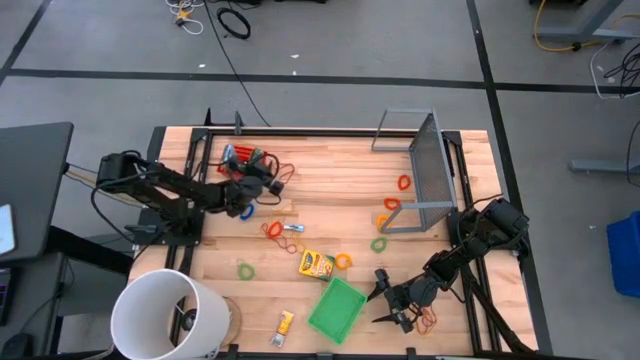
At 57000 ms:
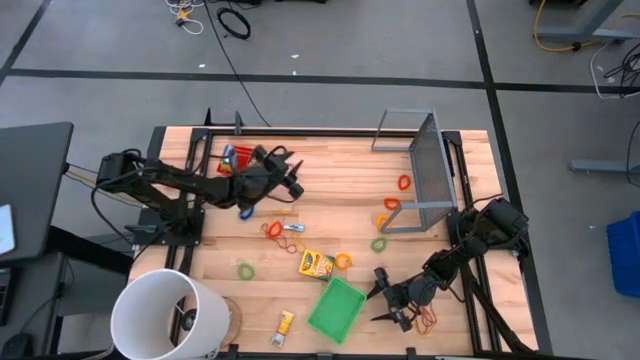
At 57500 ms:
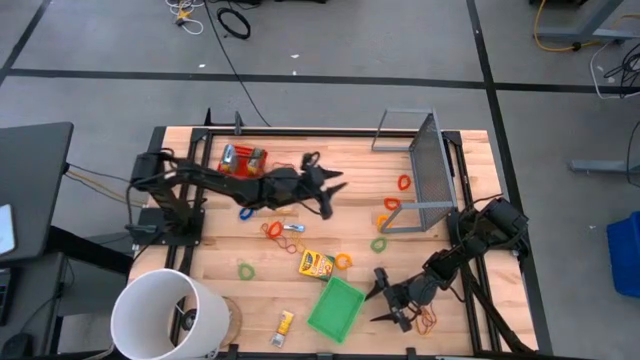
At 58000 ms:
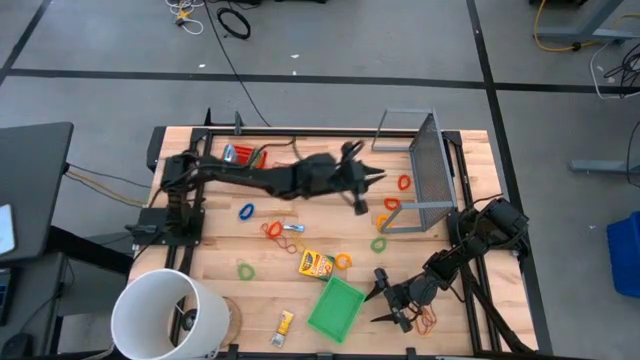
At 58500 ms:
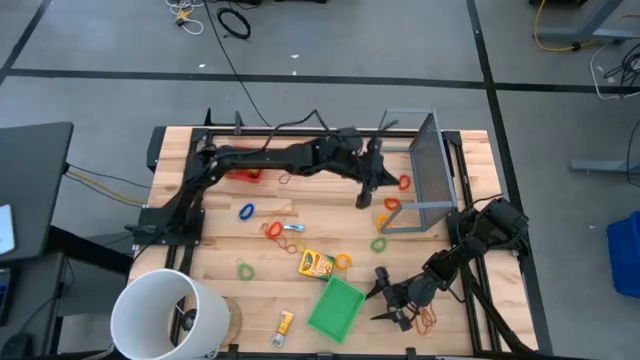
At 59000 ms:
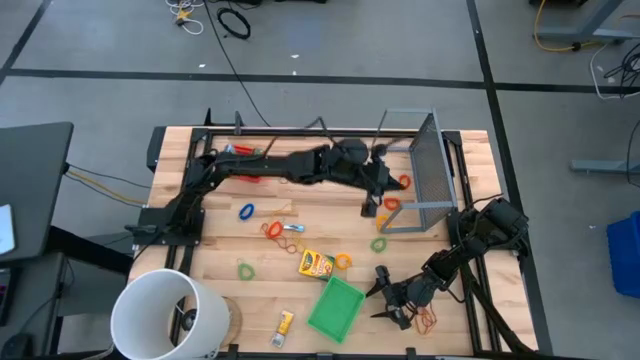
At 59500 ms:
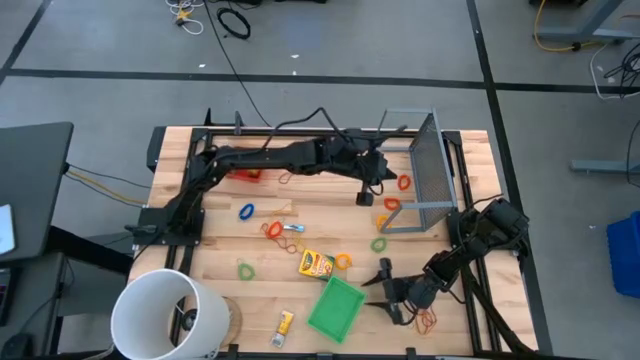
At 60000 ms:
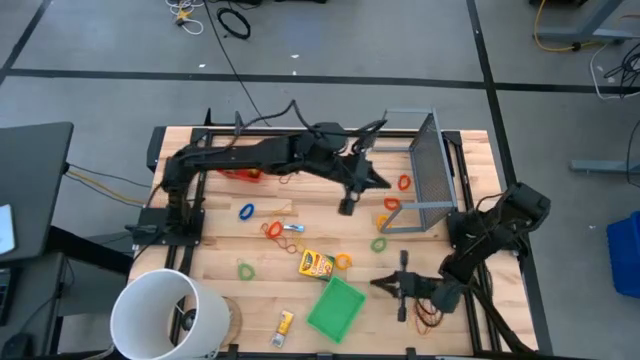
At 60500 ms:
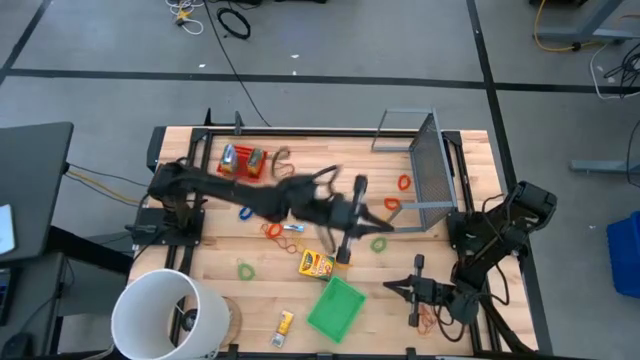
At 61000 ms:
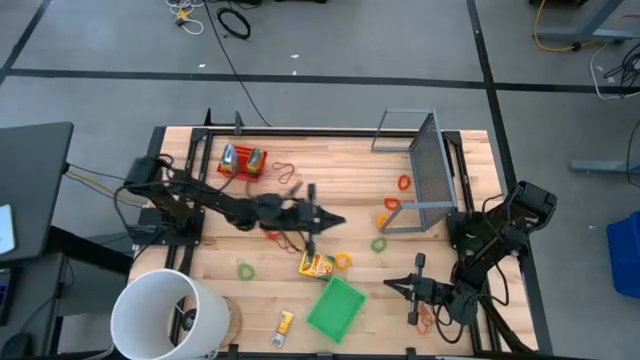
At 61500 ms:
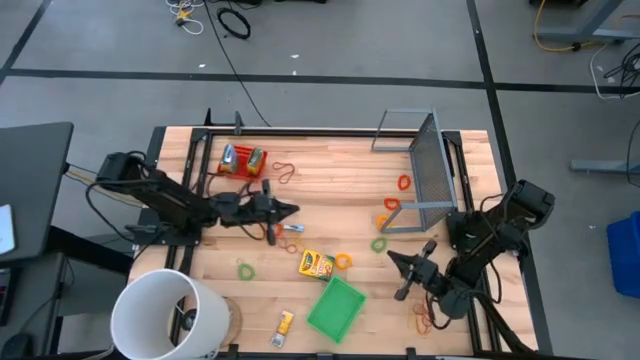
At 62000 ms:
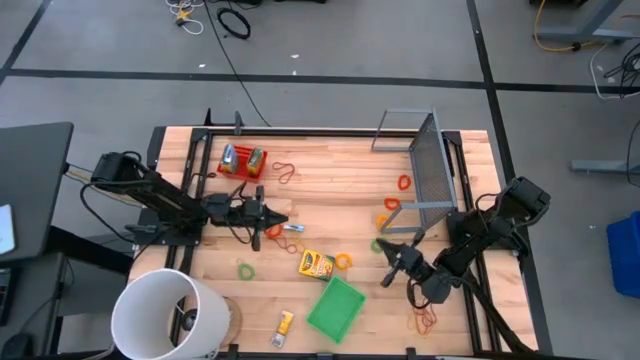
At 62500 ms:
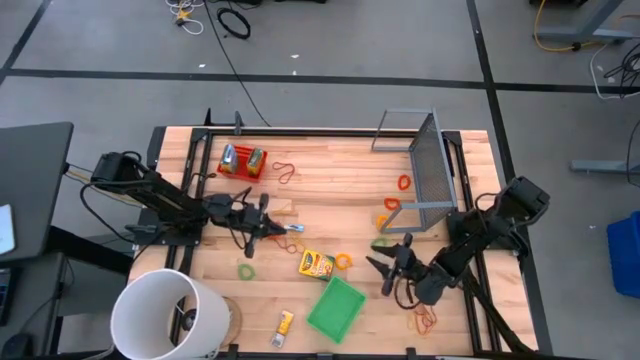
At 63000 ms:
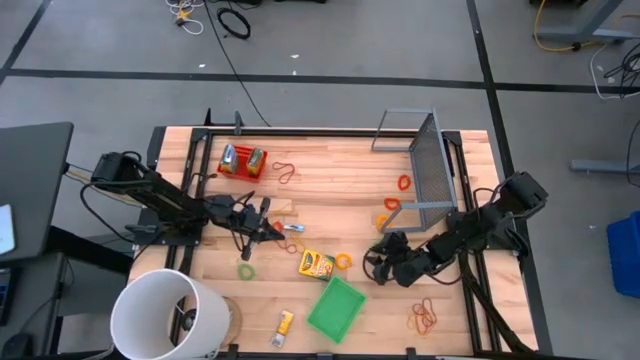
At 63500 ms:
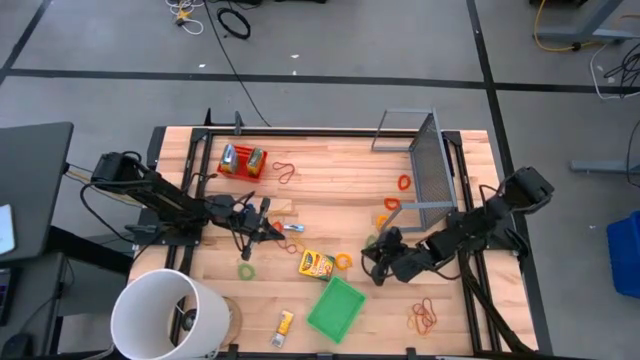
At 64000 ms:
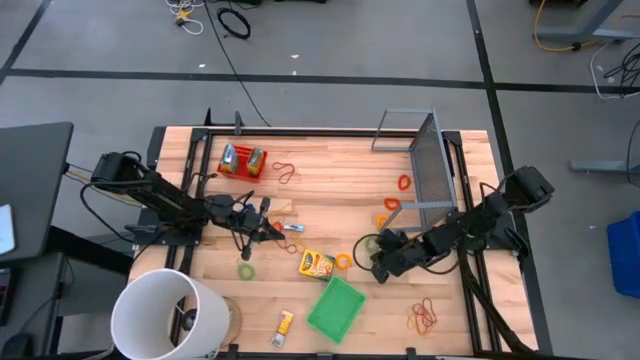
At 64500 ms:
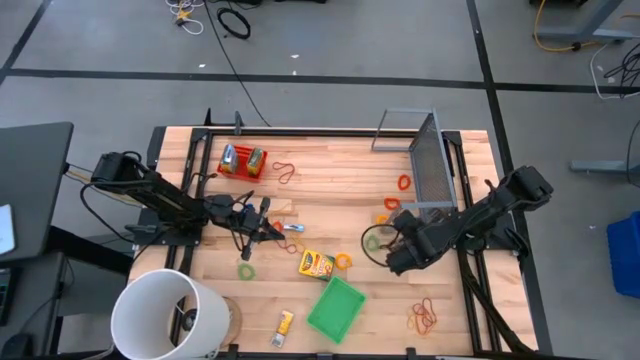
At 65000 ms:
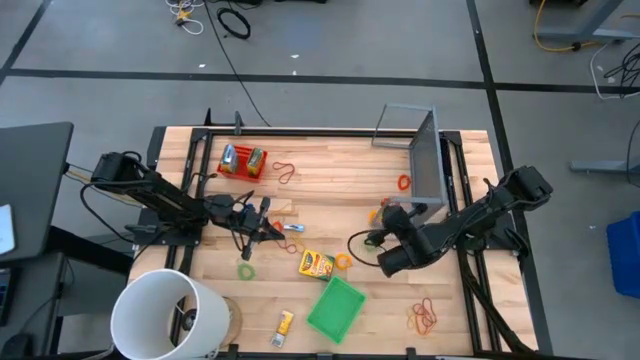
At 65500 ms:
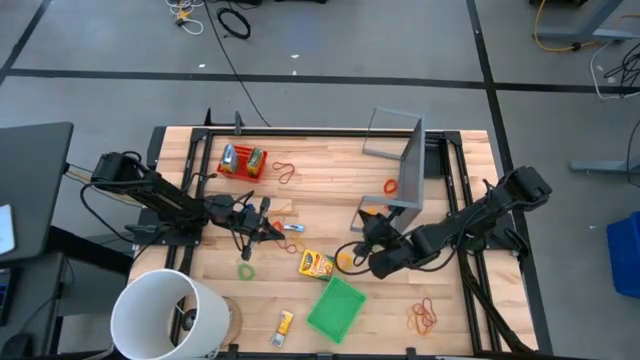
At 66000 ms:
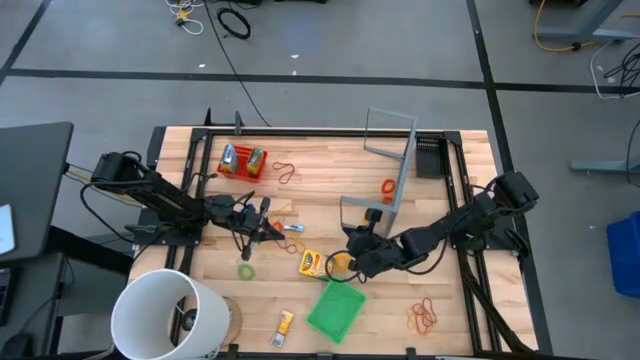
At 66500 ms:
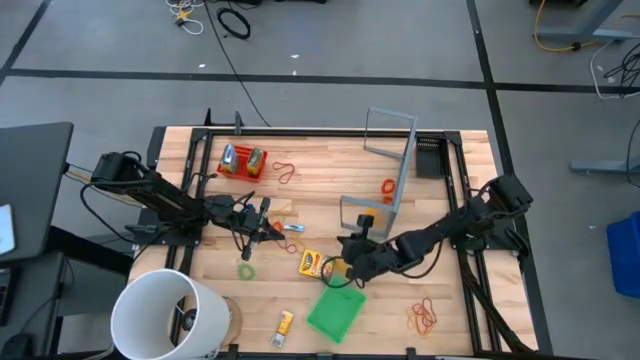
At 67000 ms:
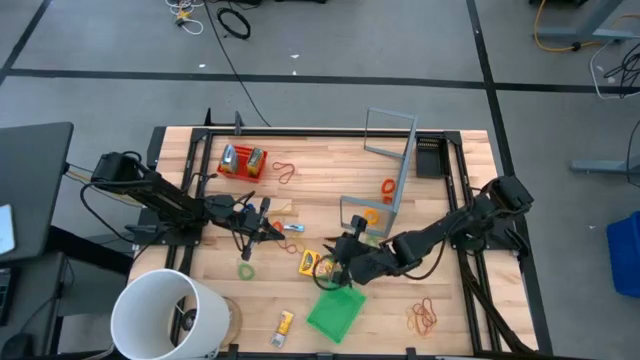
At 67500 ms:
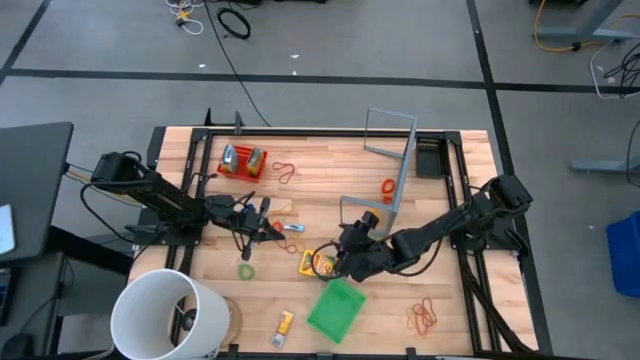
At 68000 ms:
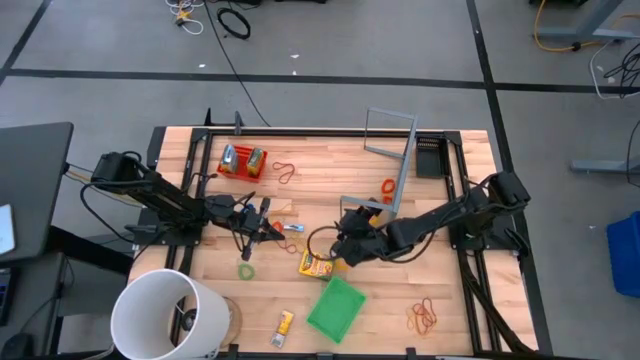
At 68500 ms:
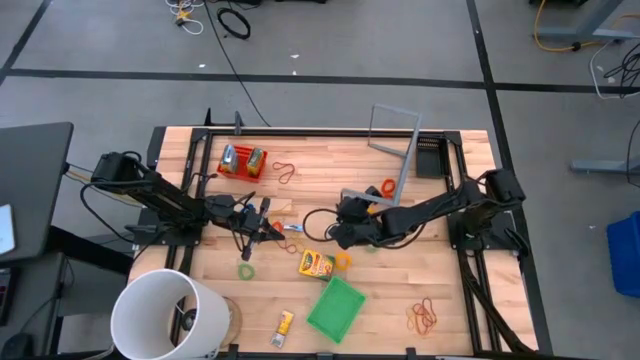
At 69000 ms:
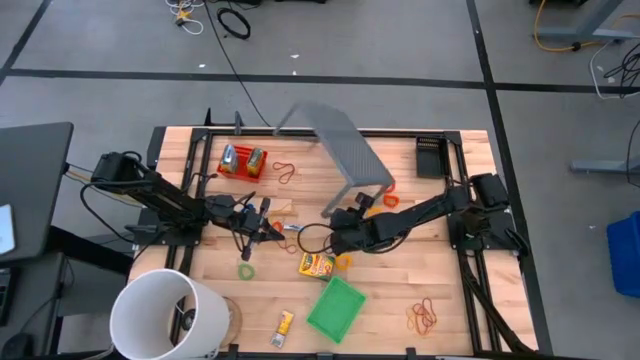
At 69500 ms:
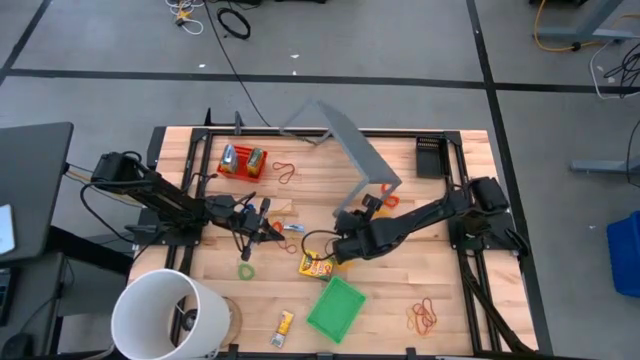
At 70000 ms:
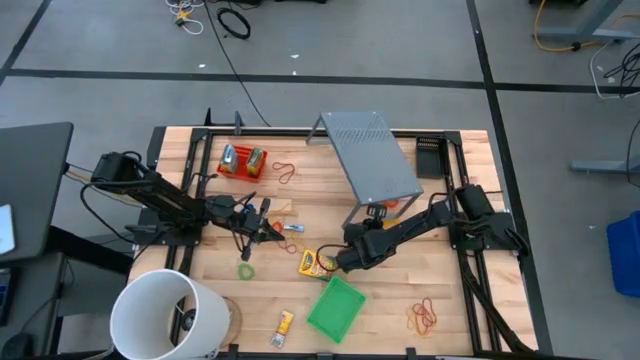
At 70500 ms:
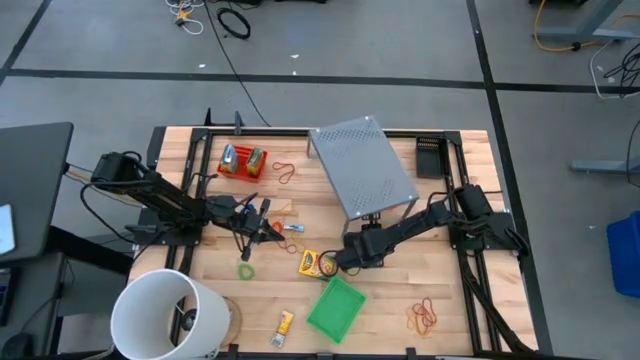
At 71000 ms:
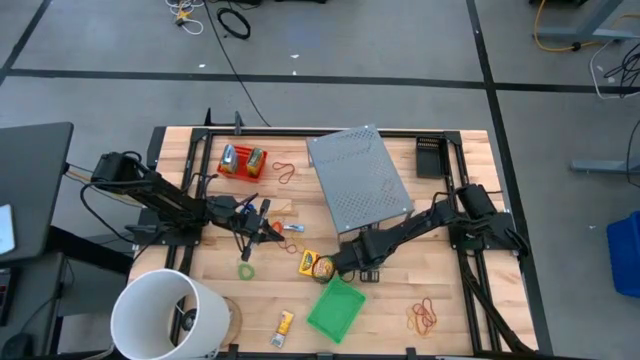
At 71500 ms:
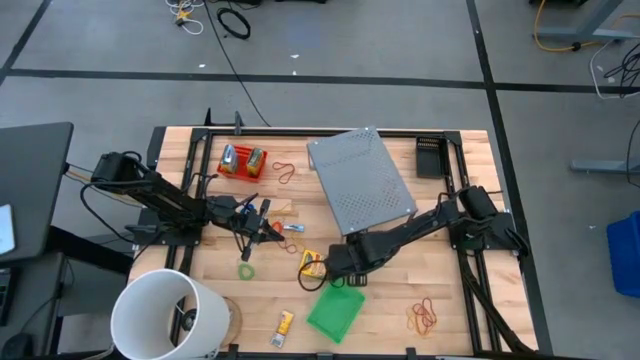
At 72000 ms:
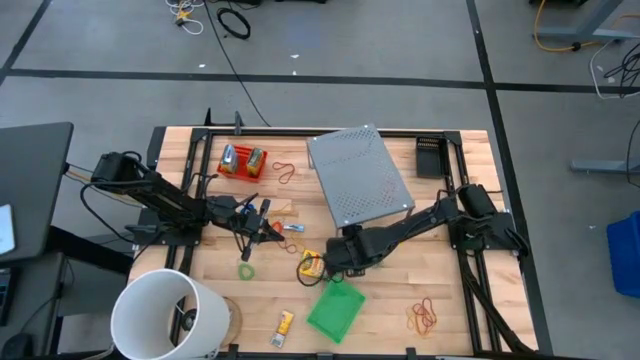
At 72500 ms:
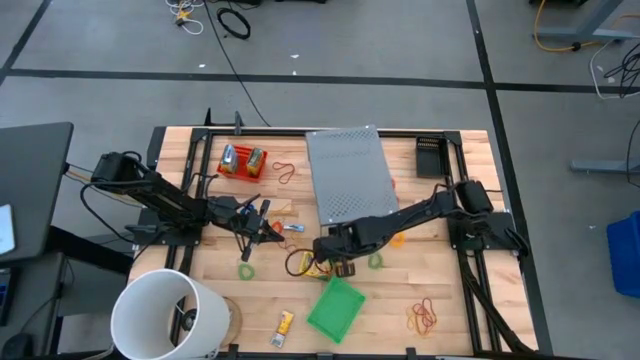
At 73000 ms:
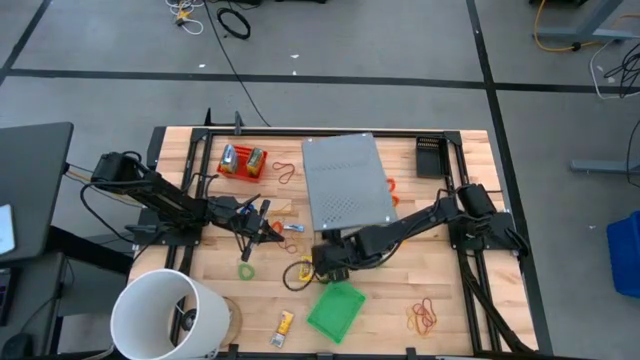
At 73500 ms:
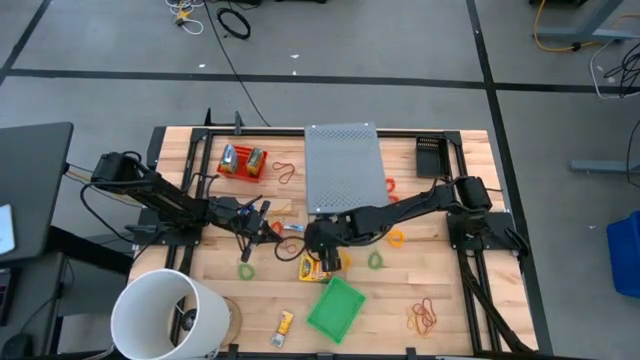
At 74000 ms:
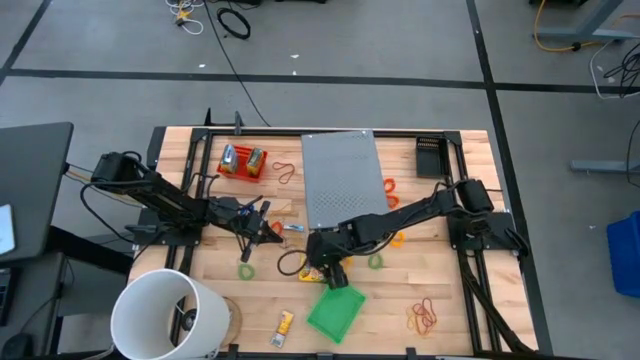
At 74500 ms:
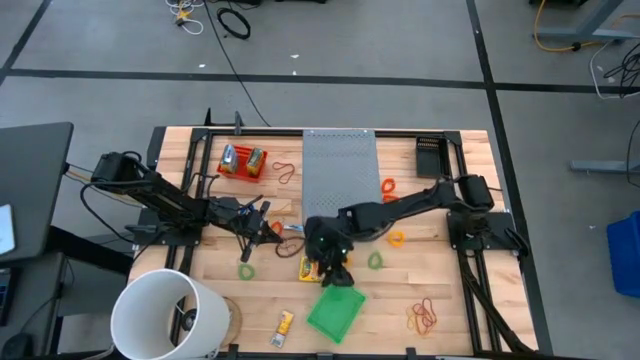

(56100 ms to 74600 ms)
Task: Pick & Place Office Desk Supplies
Adjust the shelf on the table

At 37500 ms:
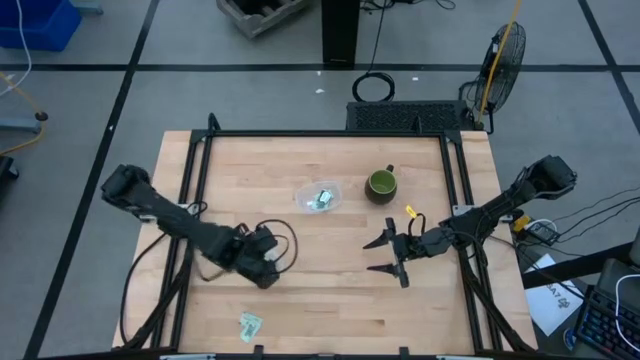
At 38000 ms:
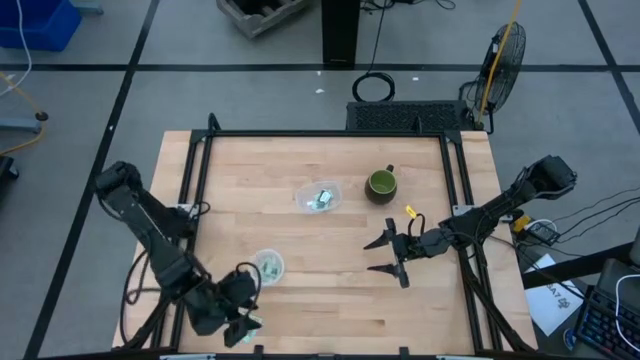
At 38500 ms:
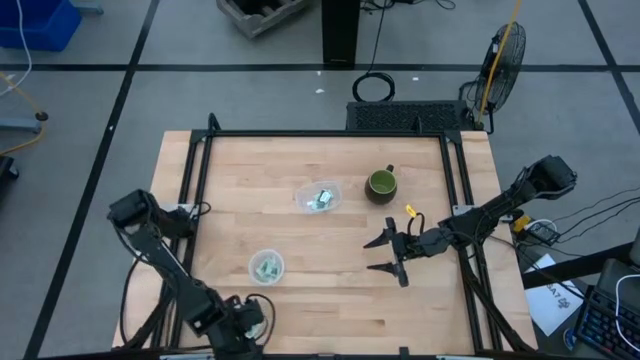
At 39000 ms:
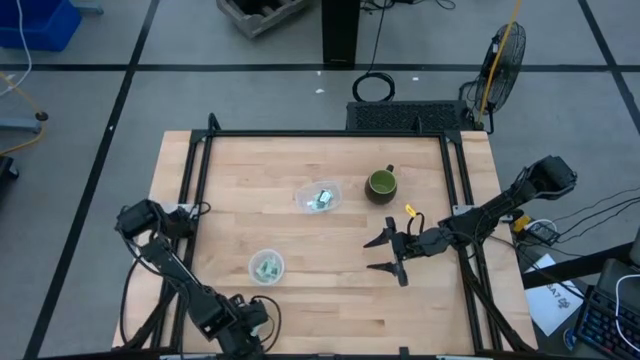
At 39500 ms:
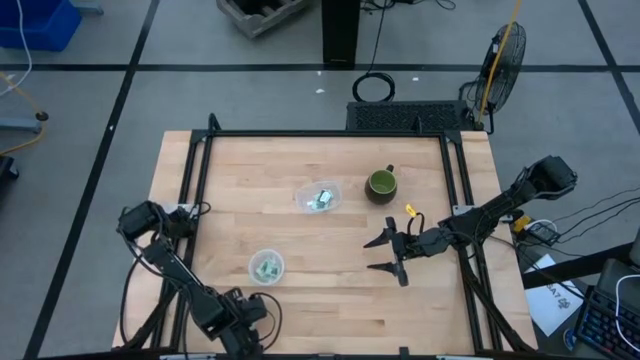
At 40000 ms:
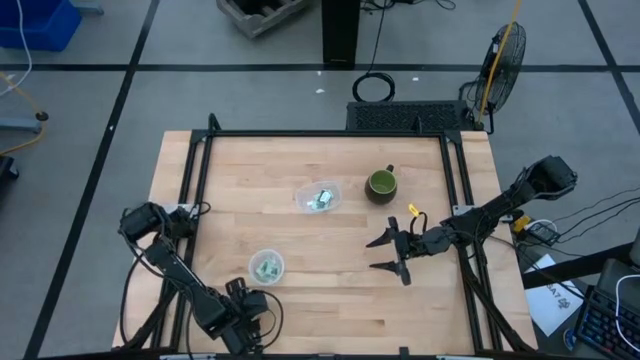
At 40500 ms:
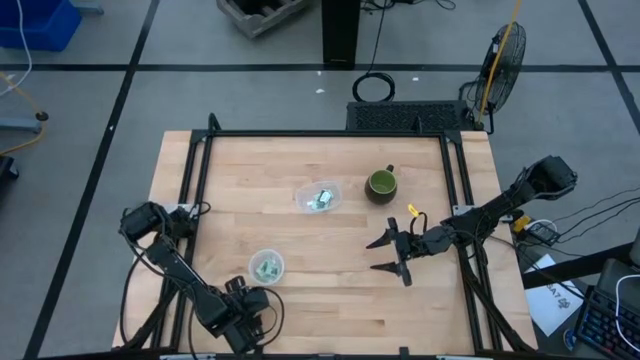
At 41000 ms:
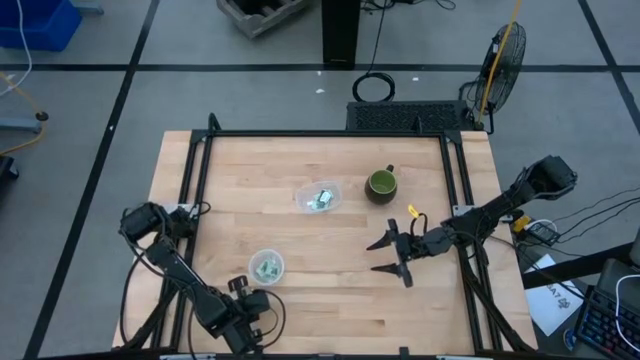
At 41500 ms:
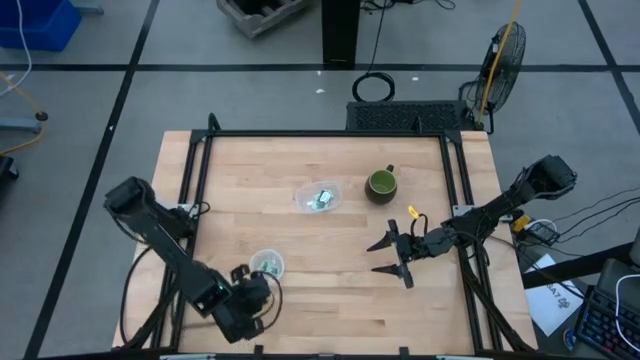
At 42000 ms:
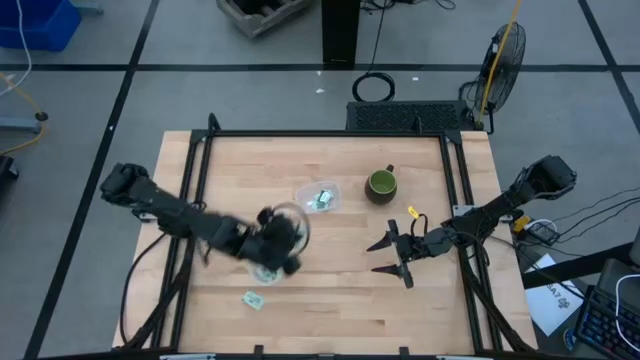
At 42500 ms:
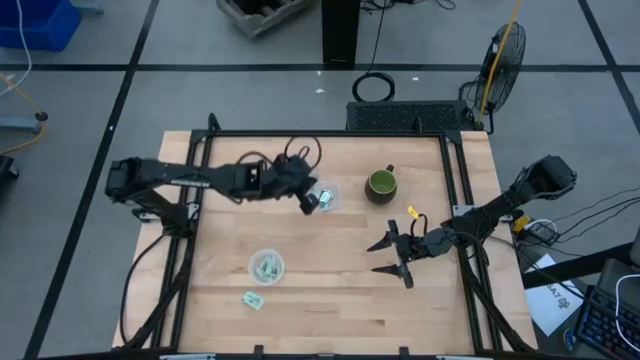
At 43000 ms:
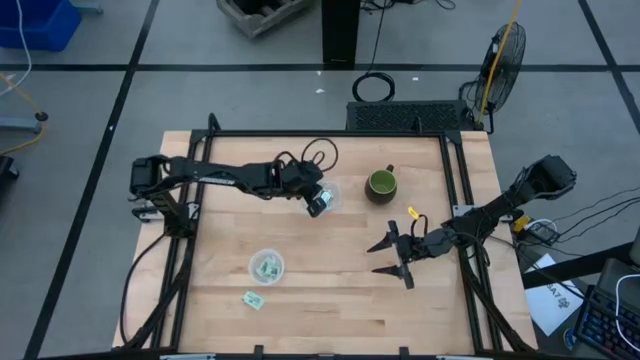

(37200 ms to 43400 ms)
Task: Pick and place Stevia / Truvia into bins
Put the stevia packet into the oval container
